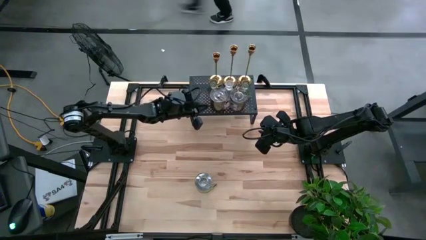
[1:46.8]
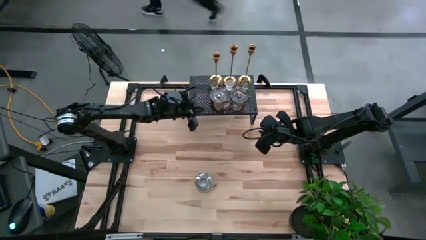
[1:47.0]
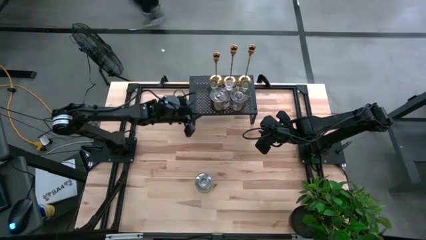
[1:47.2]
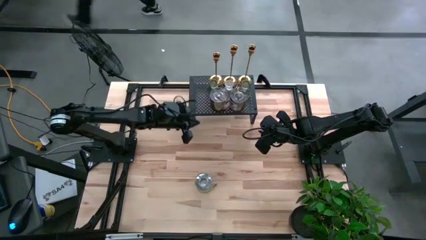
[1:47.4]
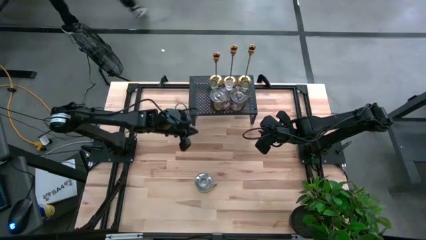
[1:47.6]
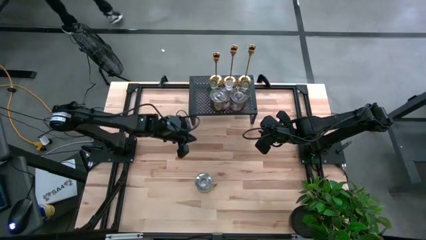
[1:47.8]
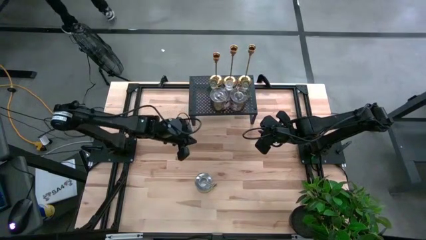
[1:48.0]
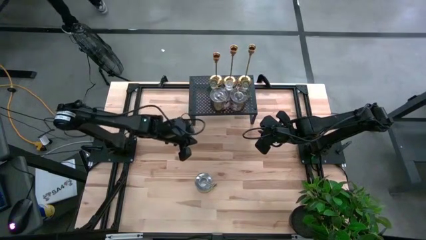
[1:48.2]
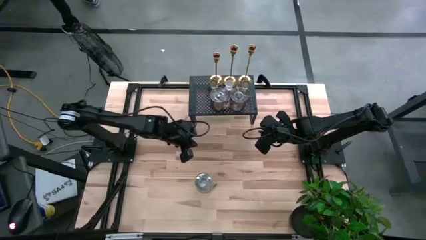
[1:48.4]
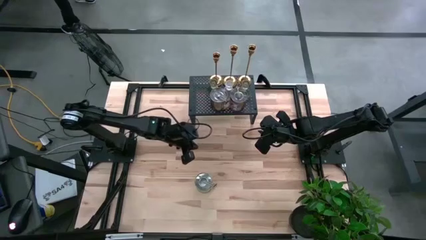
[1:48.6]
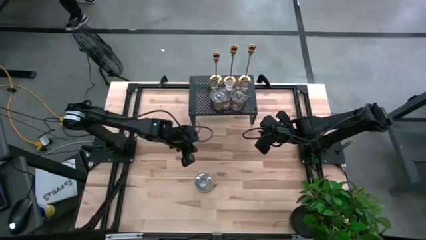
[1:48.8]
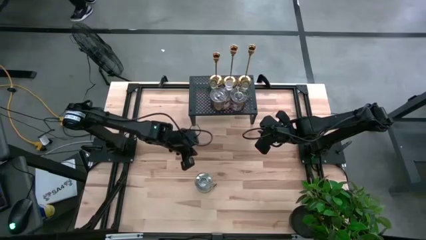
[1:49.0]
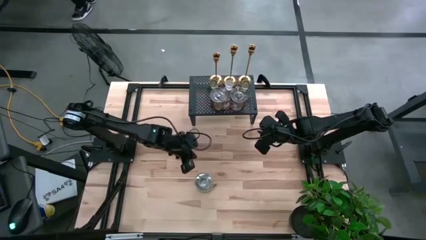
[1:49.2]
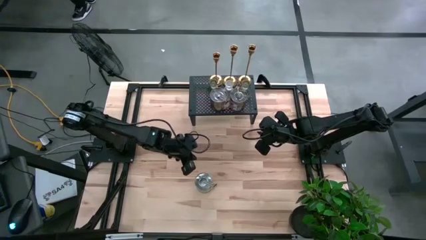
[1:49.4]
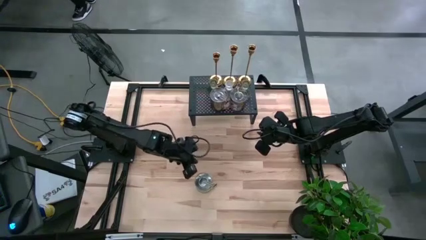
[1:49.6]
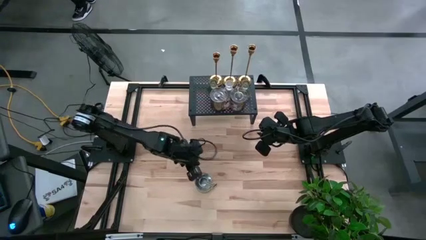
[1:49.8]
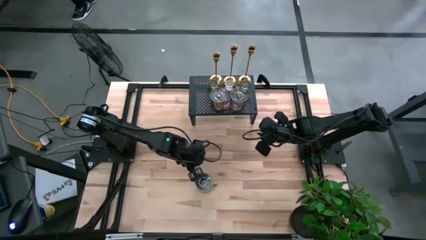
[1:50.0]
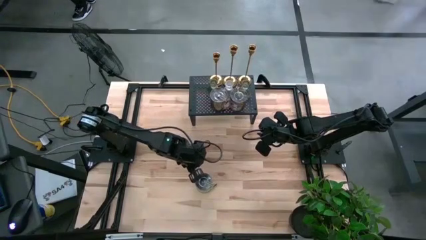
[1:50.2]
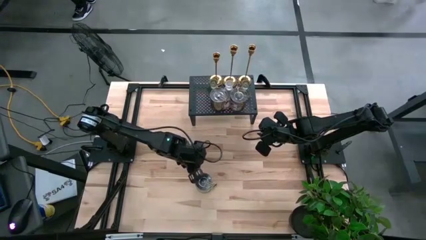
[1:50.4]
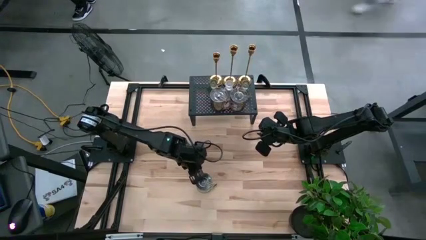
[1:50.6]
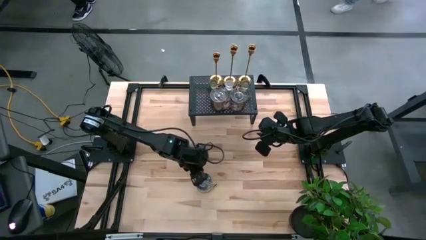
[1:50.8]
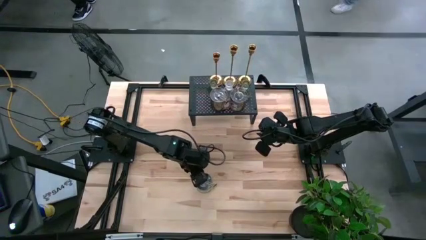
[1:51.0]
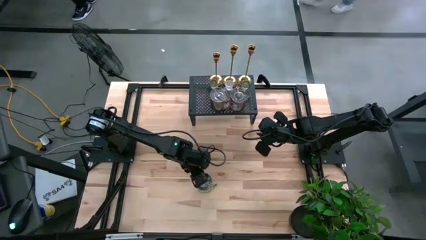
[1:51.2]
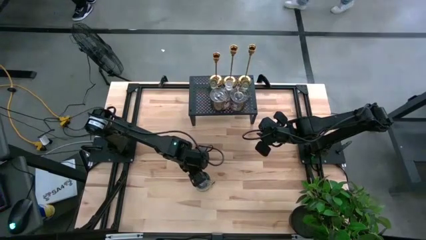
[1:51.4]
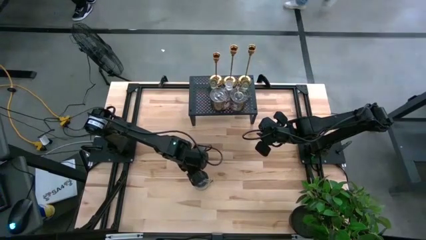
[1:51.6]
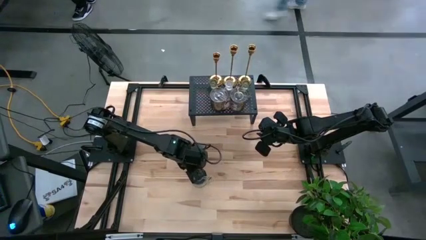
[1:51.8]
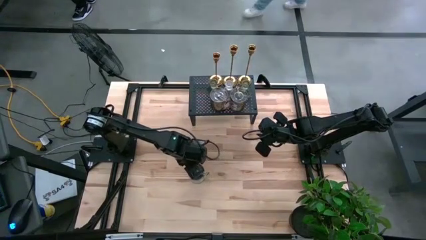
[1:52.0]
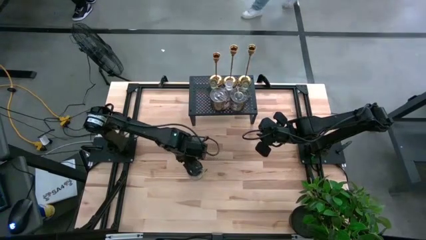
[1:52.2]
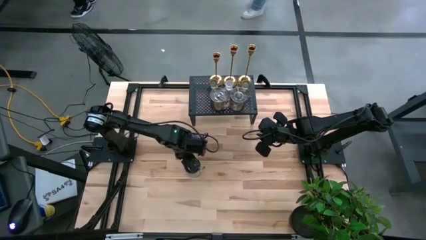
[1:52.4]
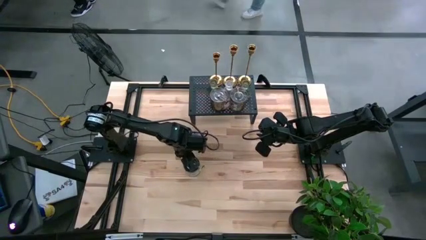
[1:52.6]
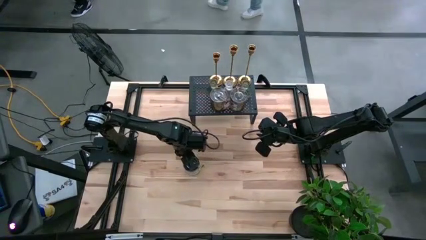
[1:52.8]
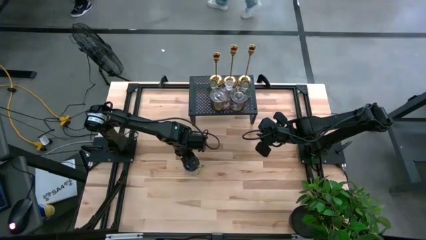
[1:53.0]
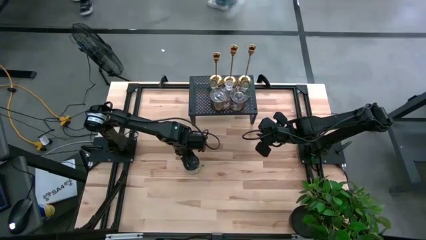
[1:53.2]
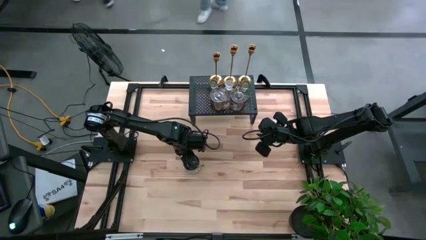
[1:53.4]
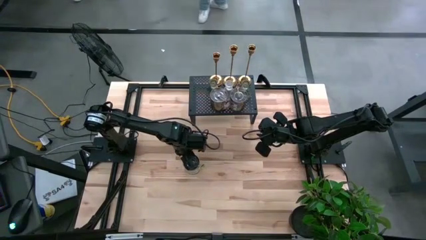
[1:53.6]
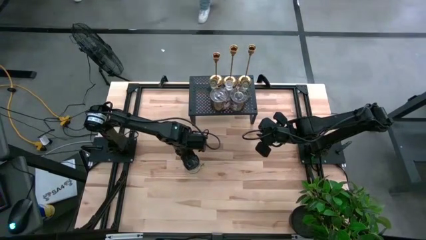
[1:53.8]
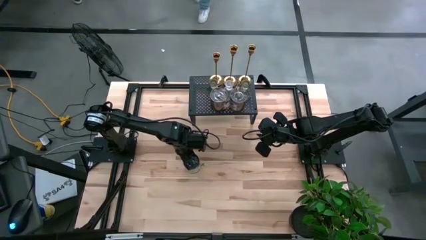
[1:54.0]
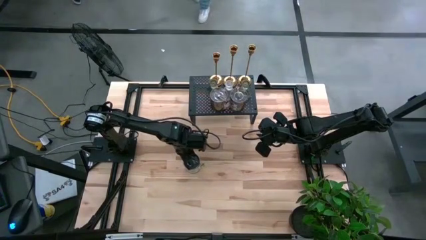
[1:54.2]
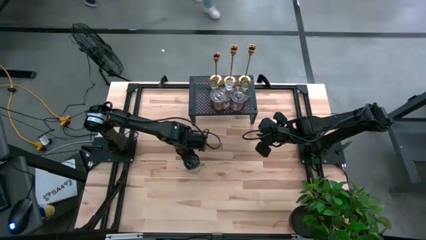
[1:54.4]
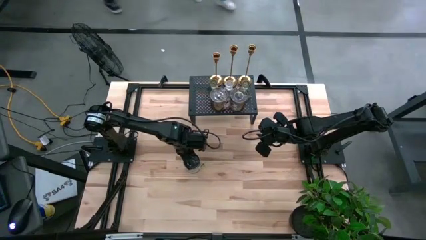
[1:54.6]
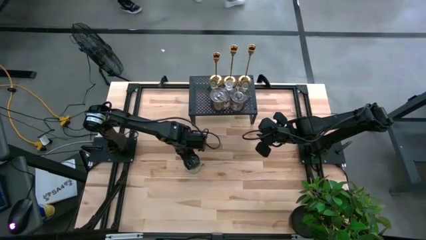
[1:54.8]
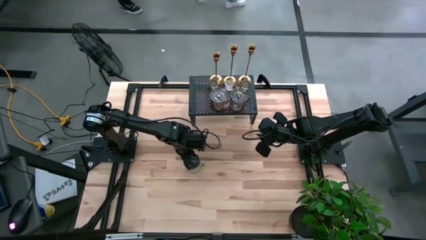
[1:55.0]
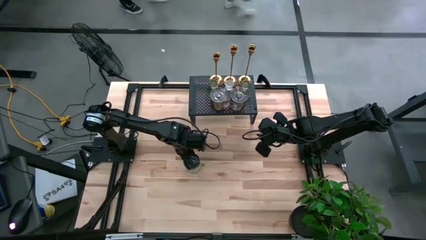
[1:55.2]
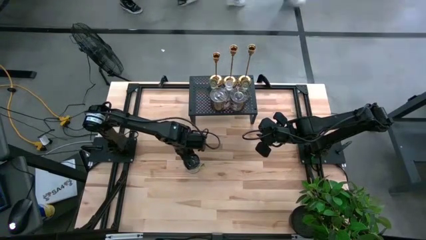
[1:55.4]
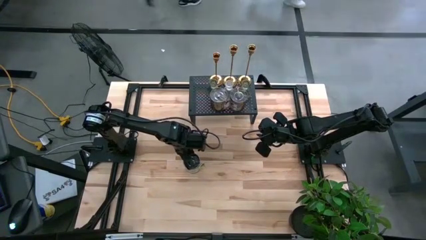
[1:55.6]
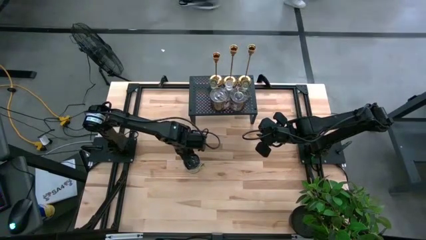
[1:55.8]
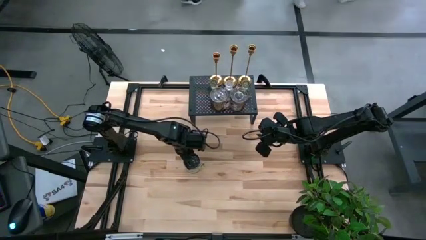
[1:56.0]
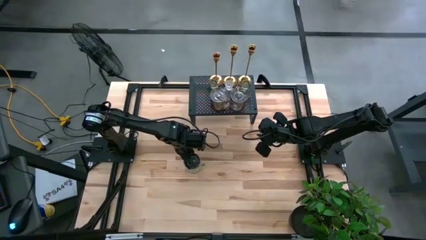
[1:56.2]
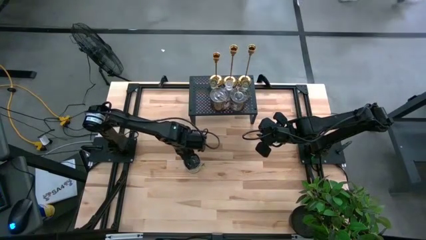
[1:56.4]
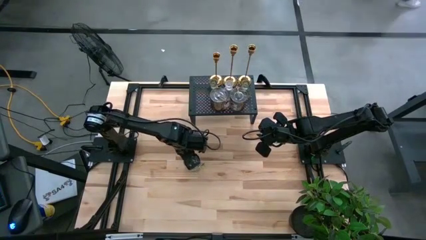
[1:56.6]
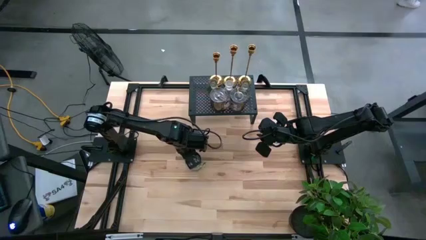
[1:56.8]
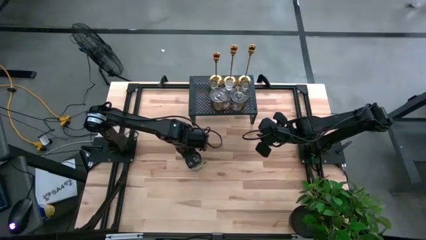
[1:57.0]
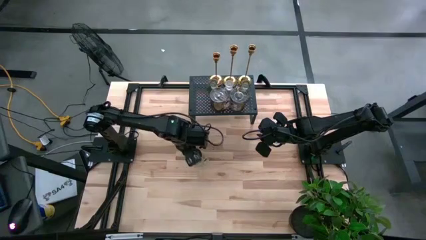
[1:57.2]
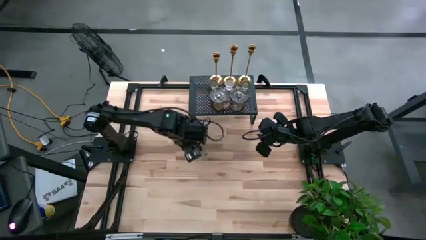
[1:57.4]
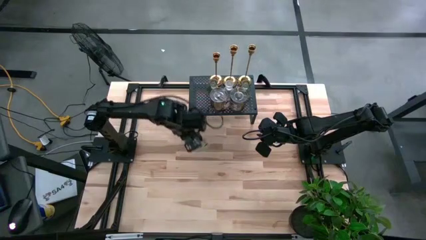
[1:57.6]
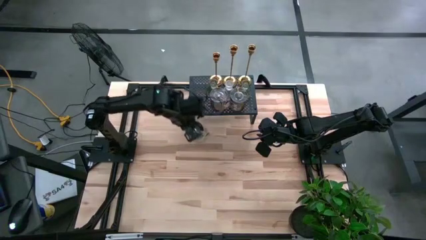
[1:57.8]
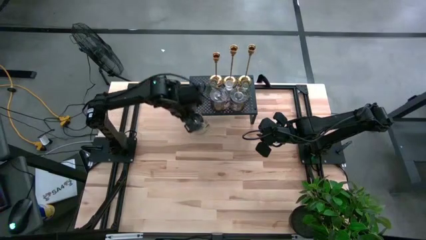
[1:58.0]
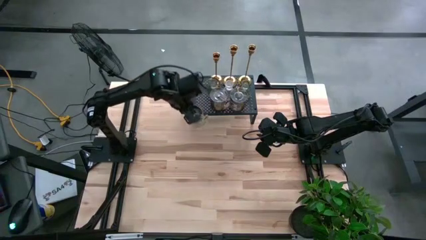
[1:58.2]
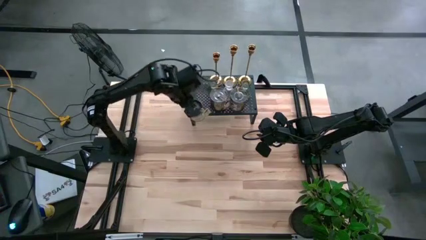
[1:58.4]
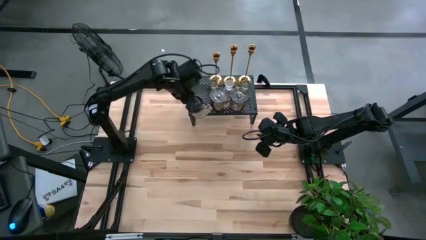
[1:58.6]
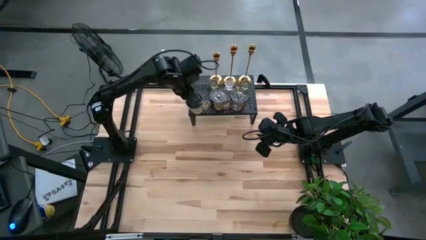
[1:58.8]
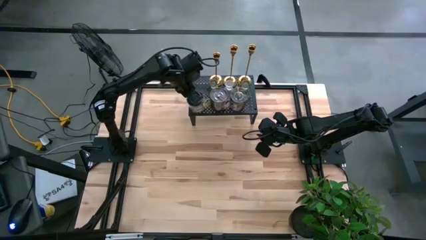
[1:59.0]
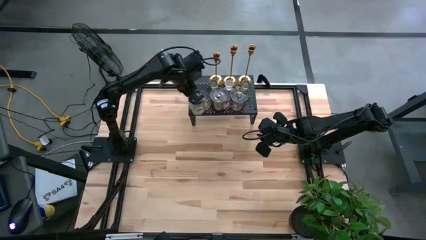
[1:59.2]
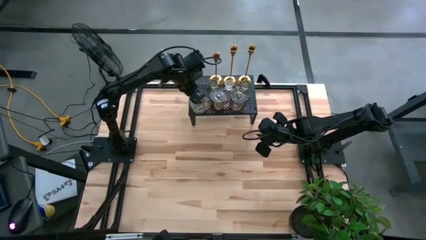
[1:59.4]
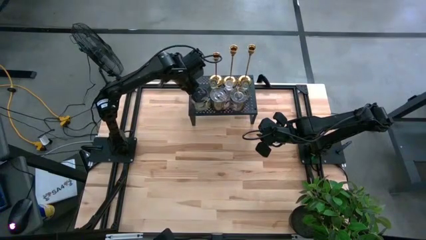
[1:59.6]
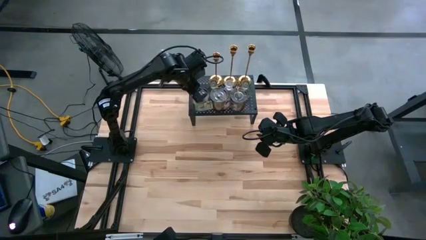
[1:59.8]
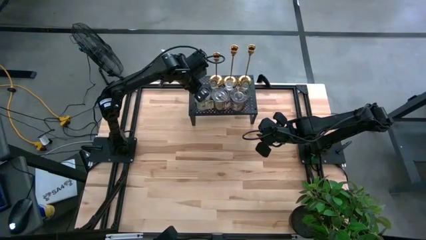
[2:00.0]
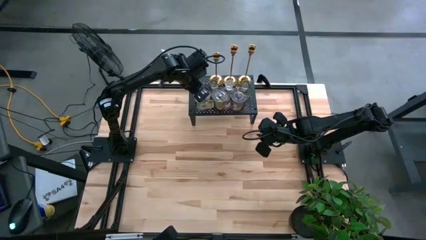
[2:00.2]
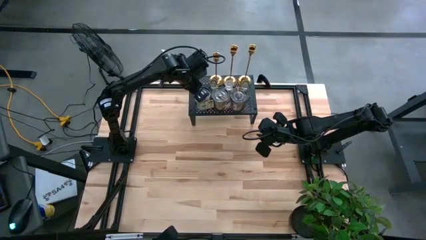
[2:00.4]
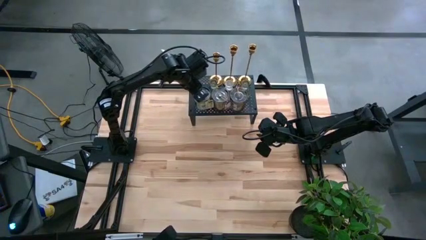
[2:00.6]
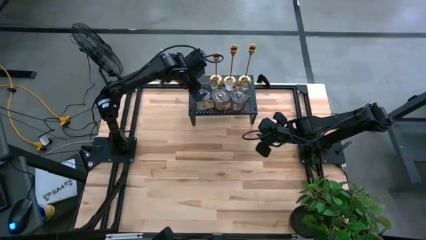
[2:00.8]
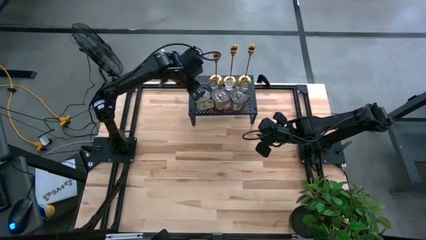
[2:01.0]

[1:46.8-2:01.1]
Task: Pick & Place candle stick holders
Put the silver scented candle on the shelf aligned with the silver scented candles
